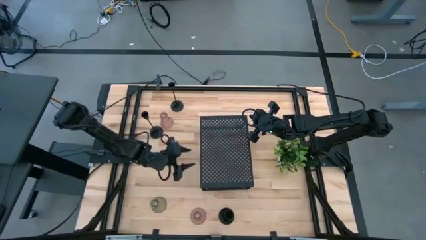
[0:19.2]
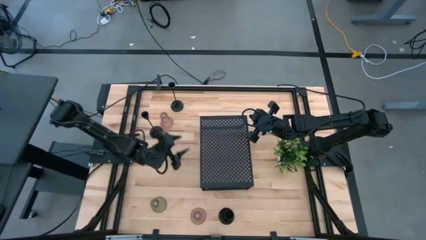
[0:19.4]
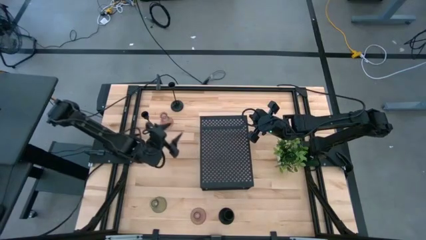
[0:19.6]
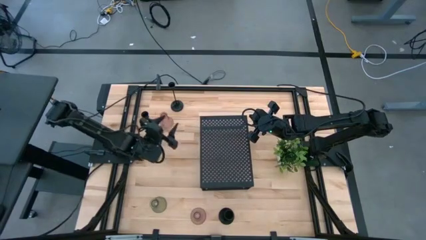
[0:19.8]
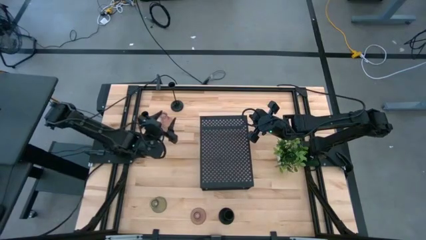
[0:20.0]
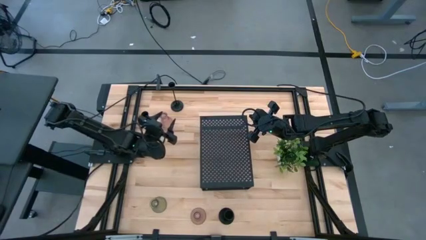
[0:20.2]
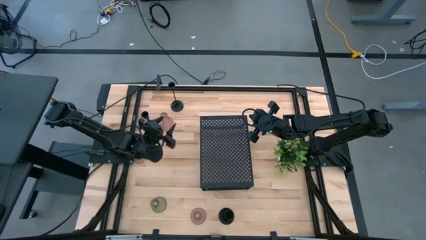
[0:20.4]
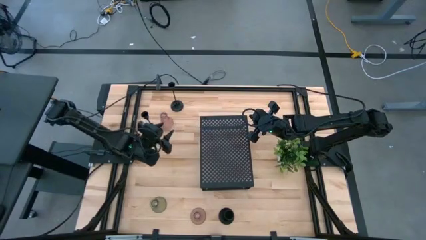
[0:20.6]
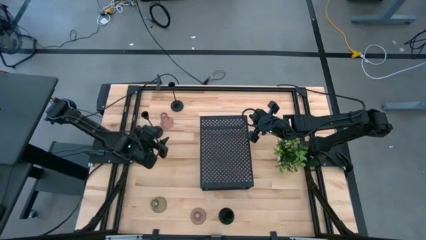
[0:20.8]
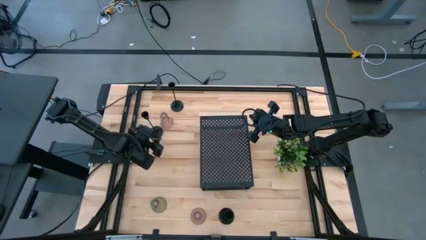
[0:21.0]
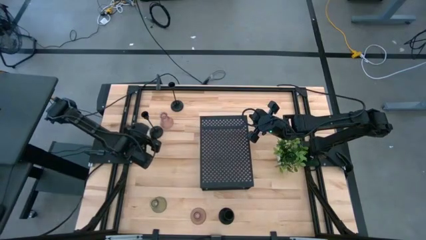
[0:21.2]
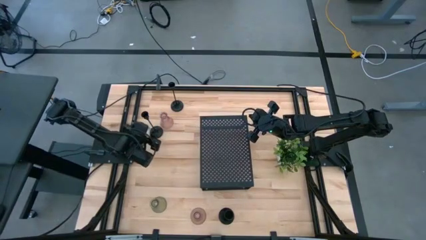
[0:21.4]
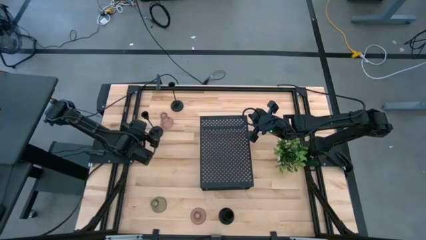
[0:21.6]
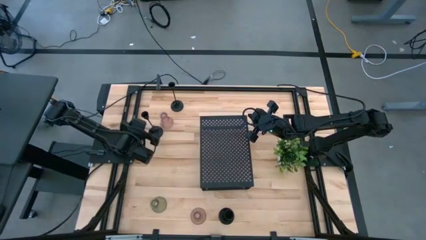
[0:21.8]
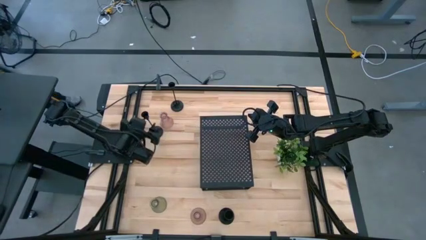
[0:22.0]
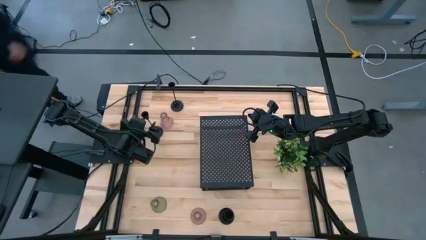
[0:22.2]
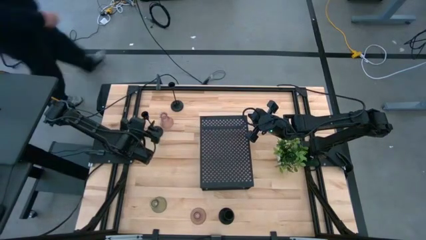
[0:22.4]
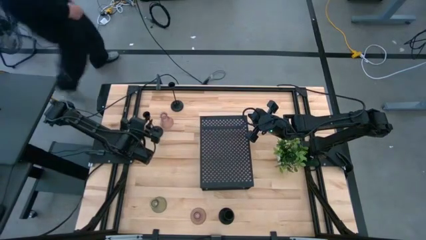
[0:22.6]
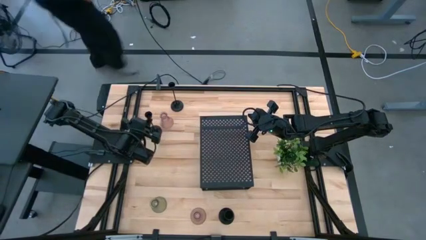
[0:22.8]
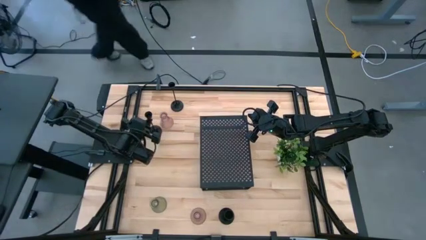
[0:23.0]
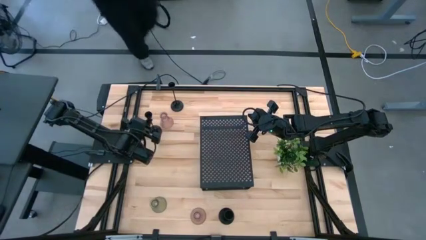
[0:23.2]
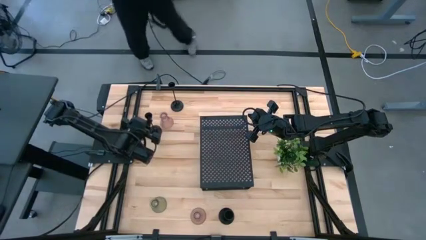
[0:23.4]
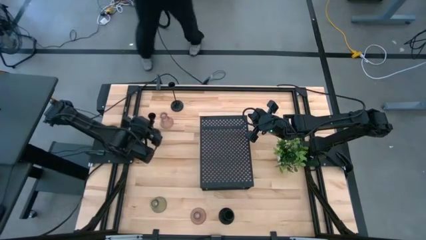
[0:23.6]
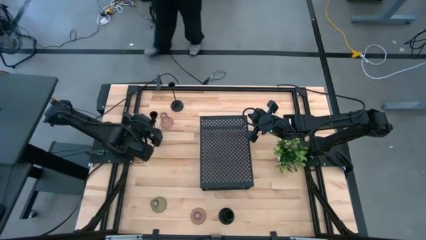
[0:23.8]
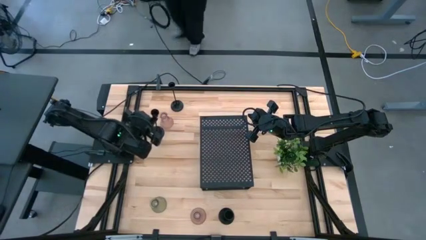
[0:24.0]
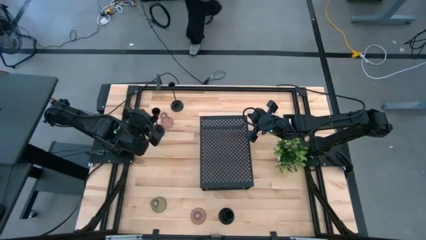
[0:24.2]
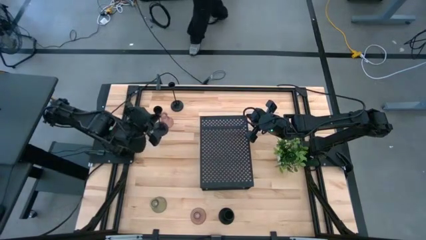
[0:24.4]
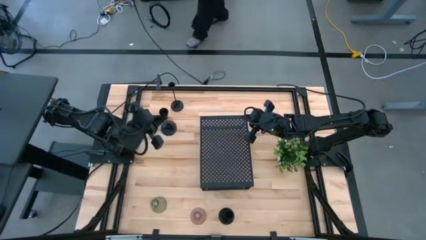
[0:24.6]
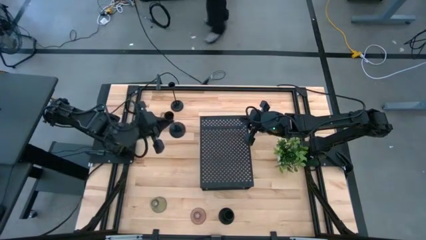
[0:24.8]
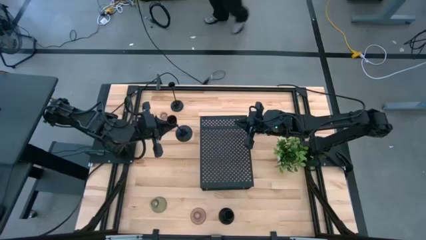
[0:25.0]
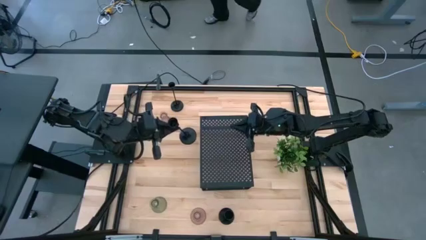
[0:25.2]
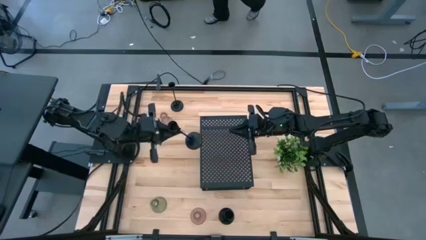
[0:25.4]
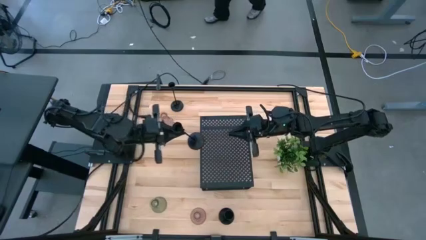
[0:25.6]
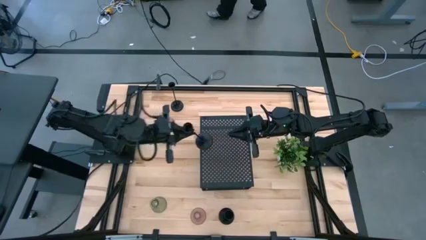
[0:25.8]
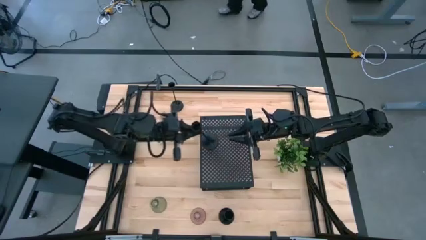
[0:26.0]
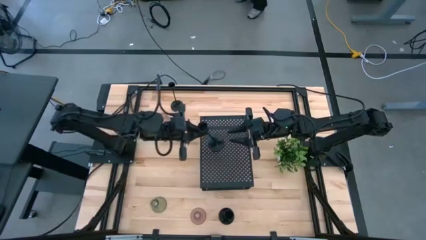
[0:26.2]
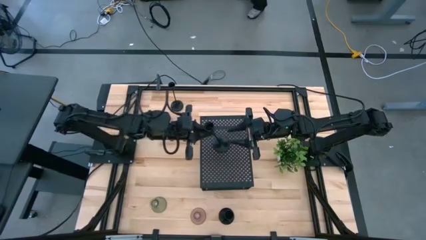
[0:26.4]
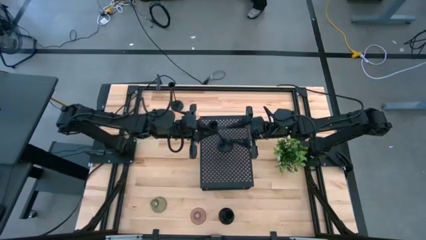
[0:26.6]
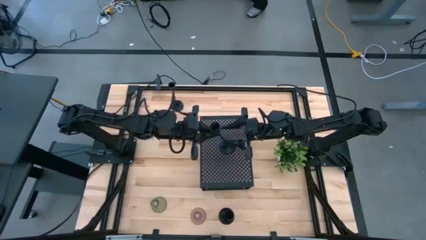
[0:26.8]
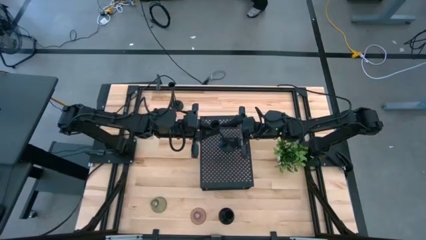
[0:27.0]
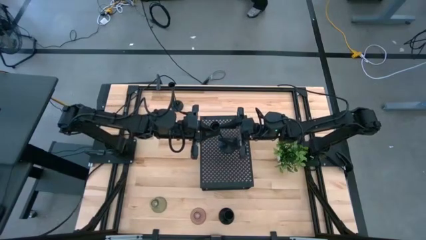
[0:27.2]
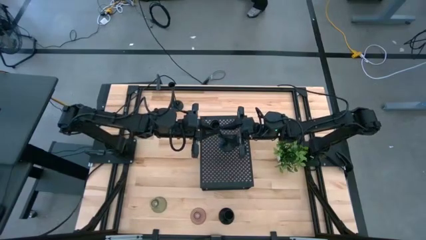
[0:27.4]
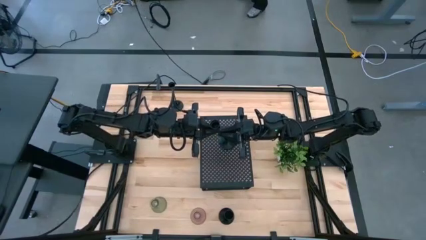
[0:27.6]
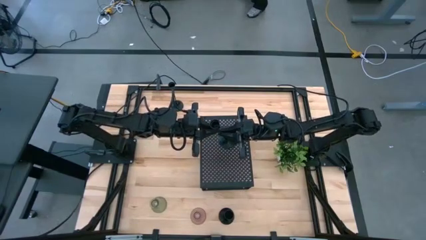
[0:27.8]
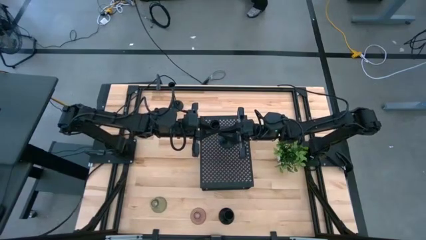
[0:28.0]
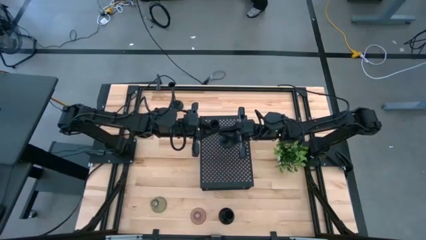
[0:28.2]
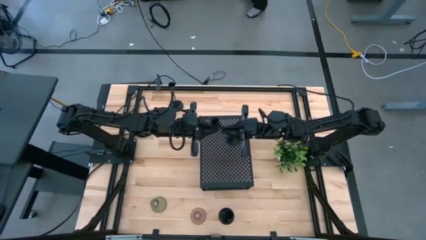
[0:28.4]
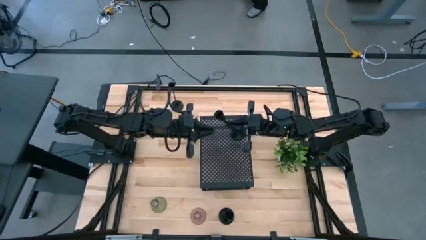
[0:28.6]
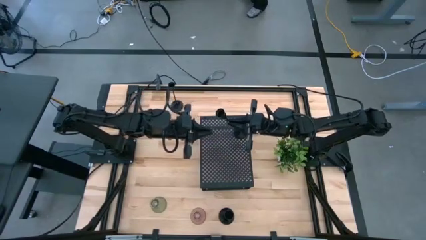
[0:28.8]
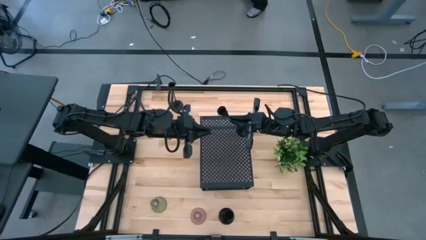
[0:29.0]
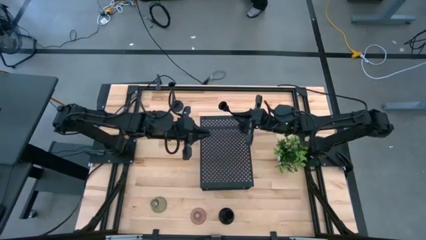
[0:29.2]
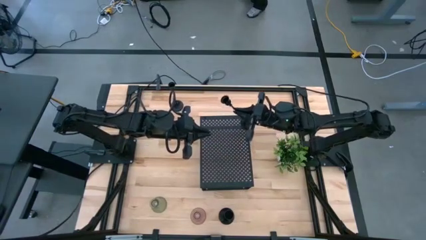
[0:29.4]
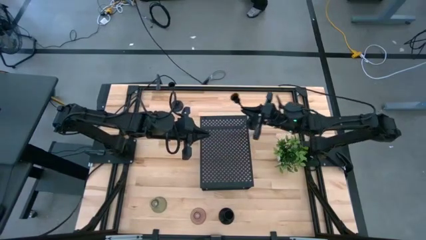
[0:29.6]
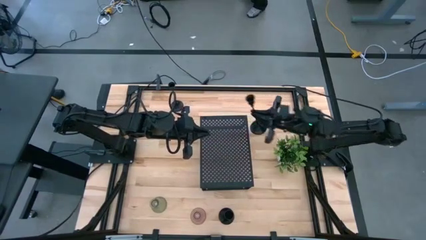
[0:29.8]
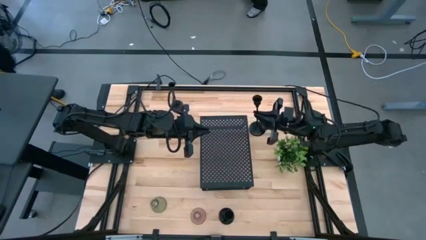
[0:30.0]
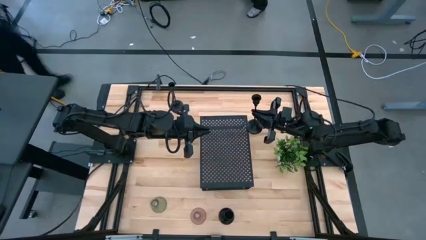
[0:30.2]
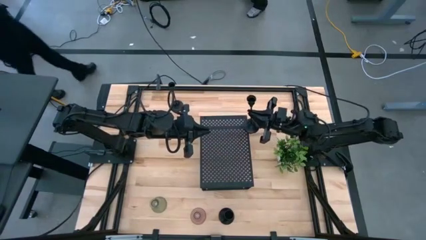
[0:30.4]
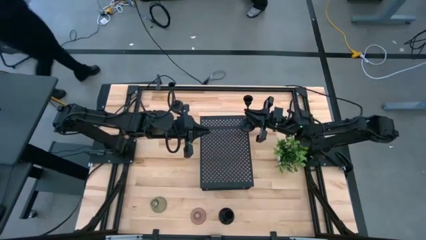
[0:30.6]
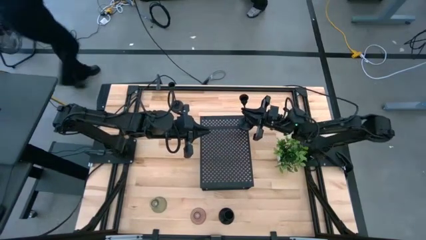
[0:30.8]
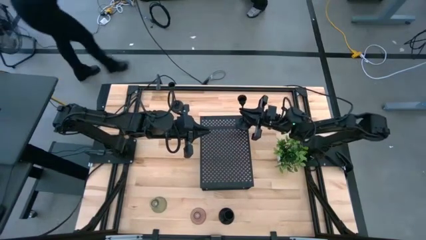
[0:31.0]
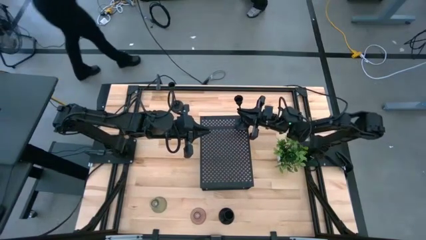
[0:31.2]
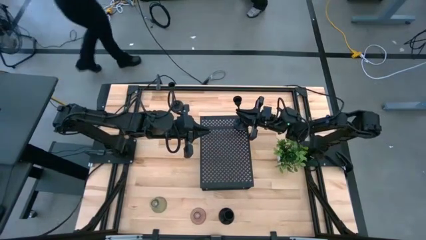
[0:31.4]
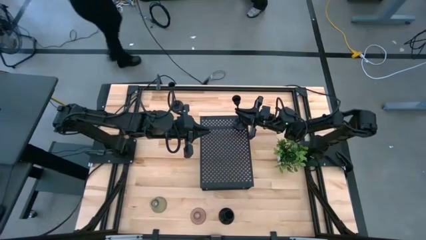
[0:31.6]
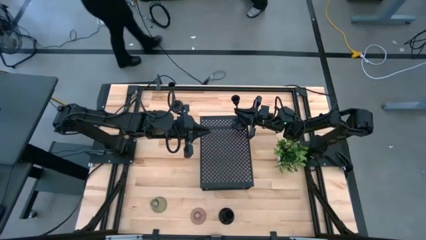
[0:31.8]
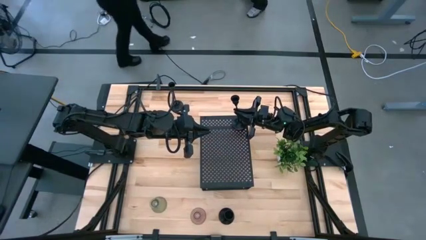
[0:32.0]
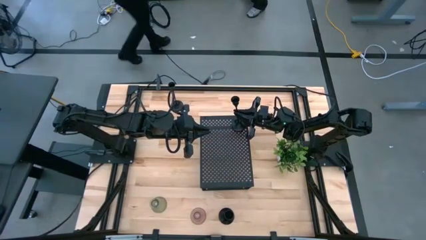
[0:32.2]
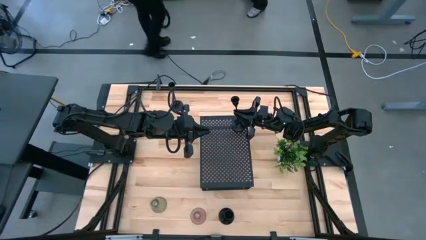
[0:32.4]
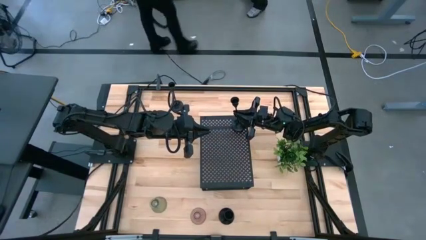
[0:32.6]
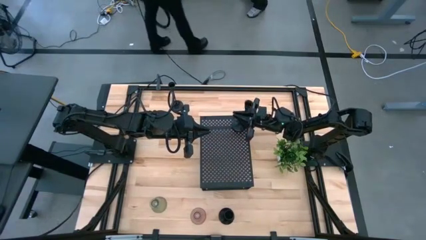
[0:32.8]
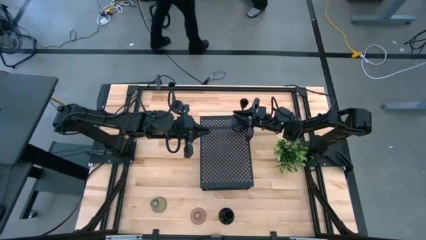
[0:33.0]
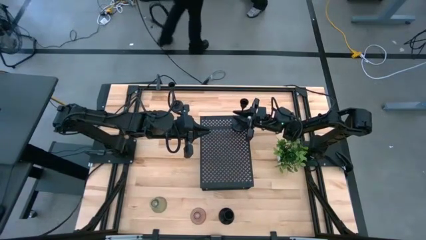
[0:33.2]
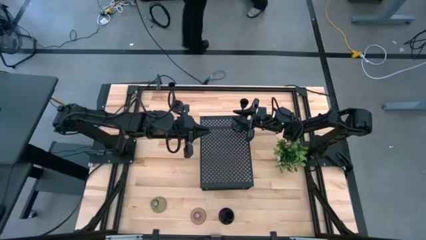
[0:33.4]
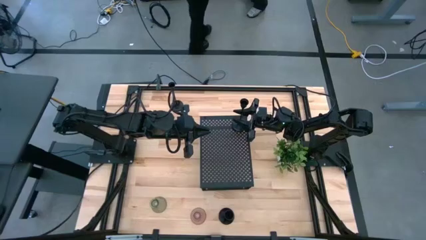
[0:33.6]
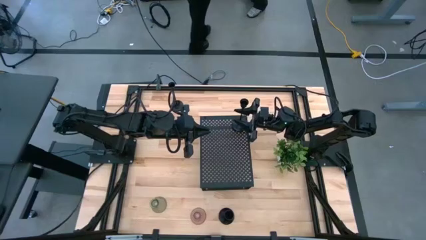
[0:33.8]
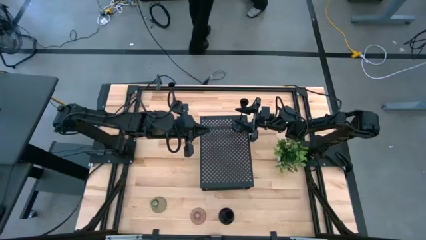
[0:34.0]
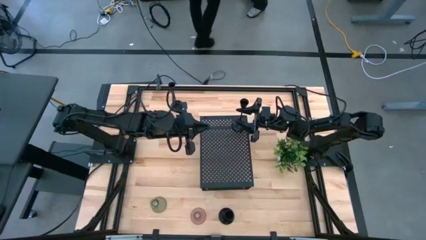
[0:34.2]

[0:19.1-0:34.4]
Task: Pick & Place candle stick holders
Put the middle left black candle holder on the shelf
